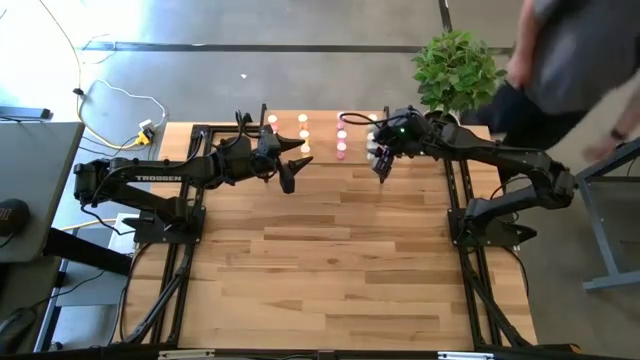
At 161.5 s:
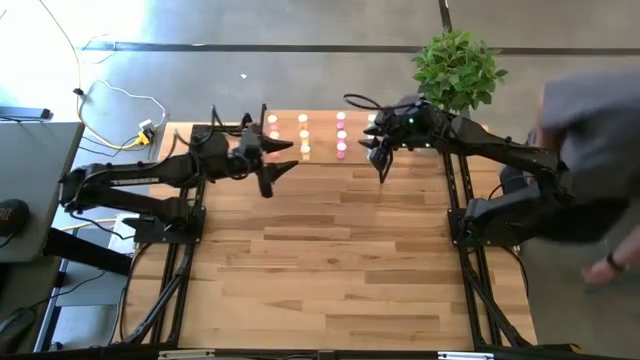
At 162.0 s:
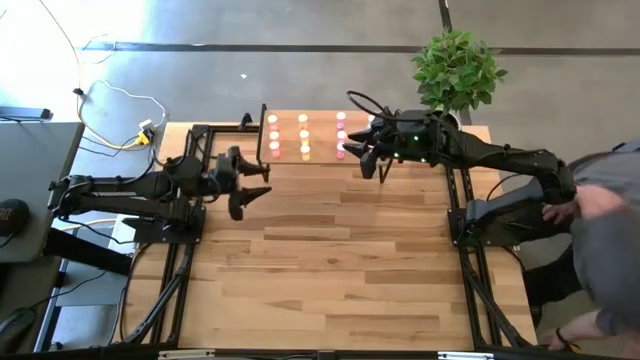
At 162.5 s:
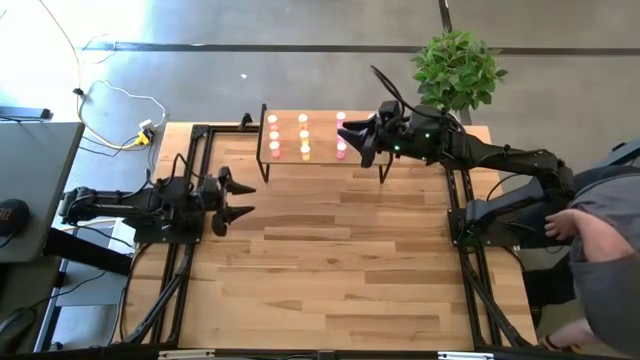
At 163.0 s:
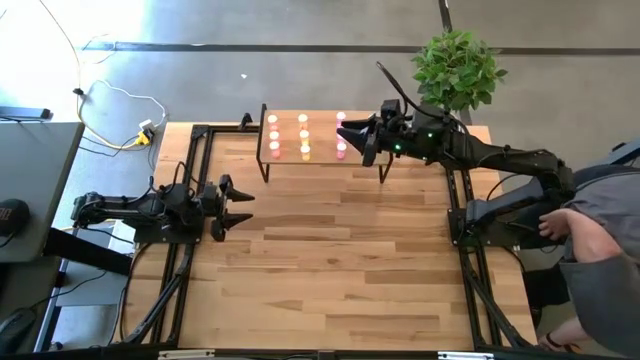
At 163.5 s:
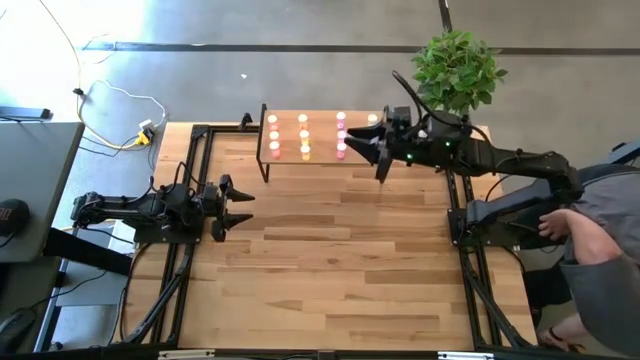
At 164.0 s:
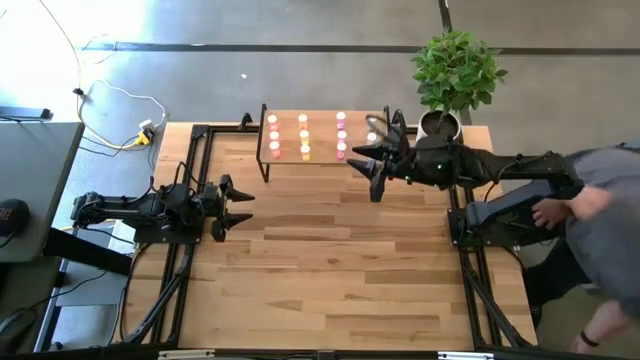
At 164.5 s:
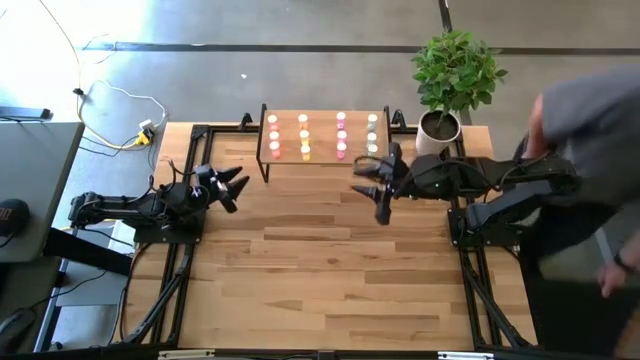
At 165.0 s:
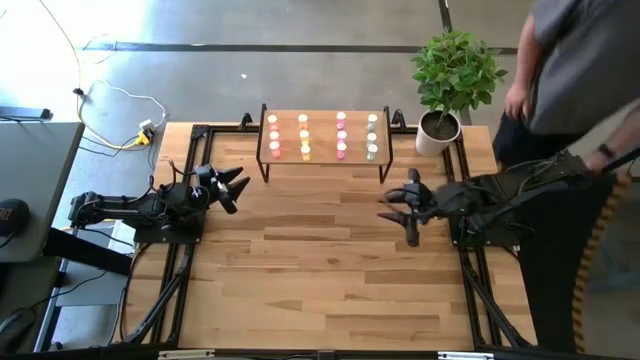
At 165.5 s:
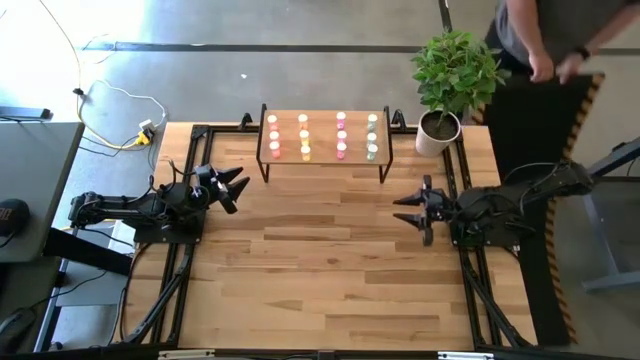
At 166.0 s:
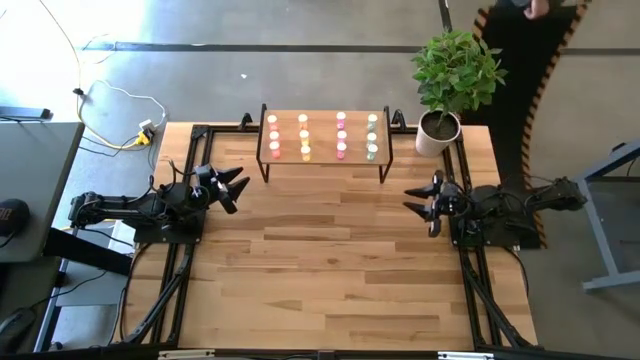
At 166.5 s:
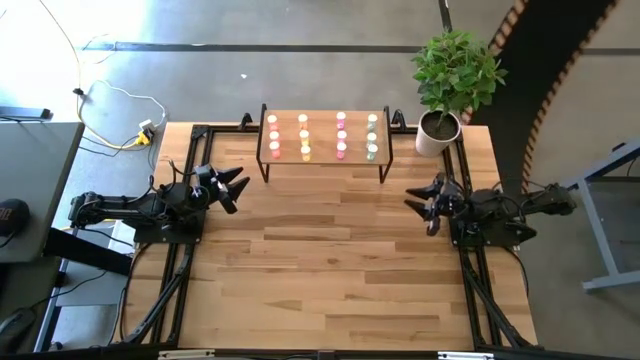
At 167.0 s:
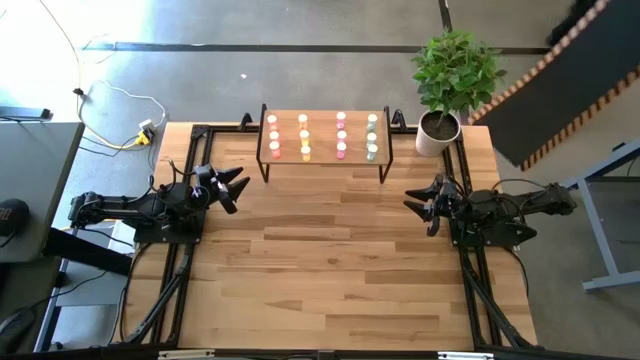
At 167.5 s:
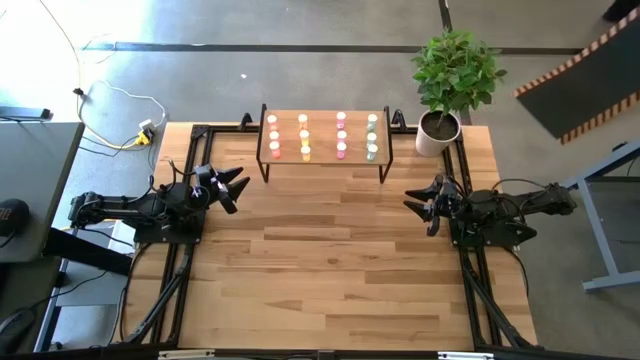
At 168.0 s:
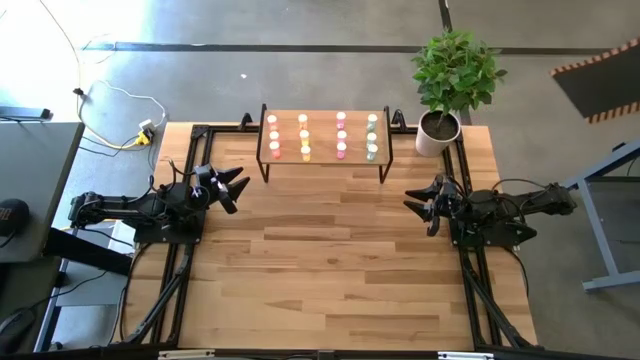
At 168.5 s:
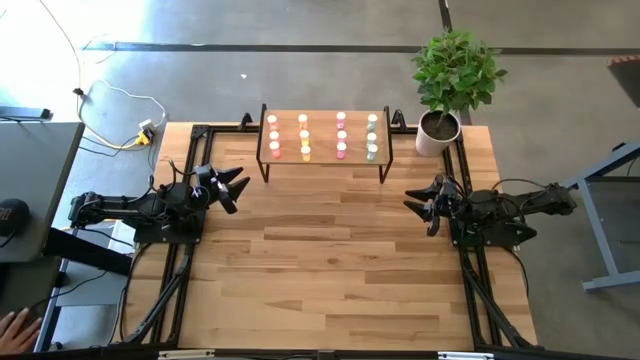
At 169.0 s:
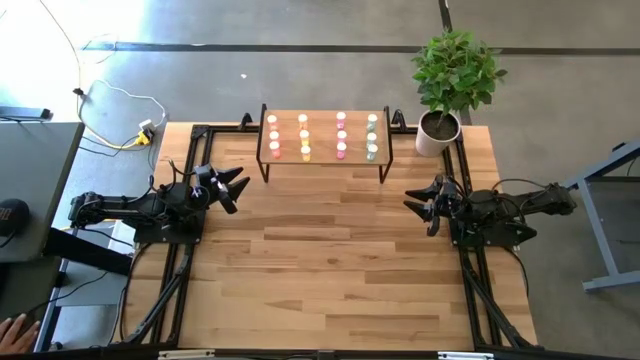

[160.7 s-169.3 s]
Task: Pick and place medicine bottles onto shelf by color
Return to Home Position

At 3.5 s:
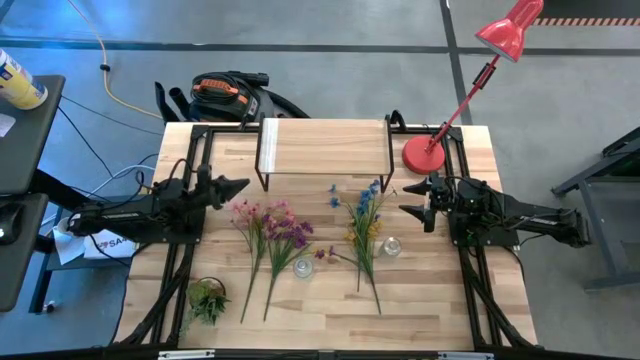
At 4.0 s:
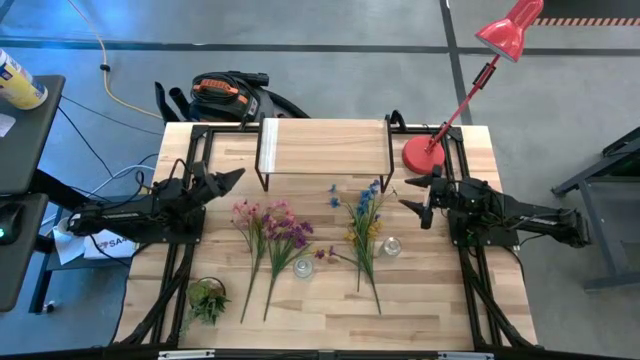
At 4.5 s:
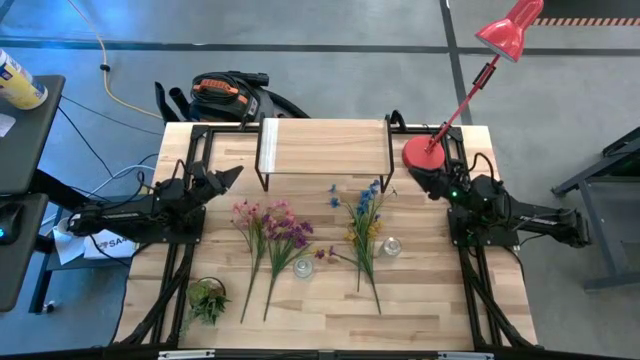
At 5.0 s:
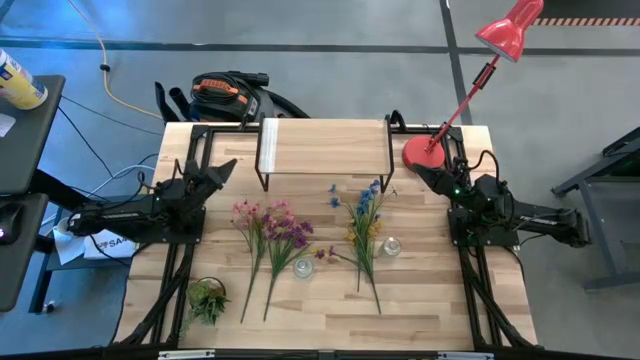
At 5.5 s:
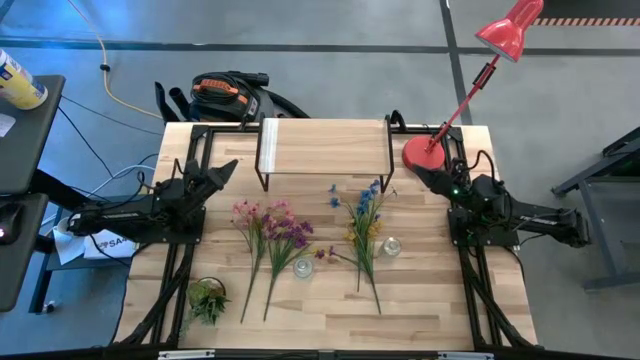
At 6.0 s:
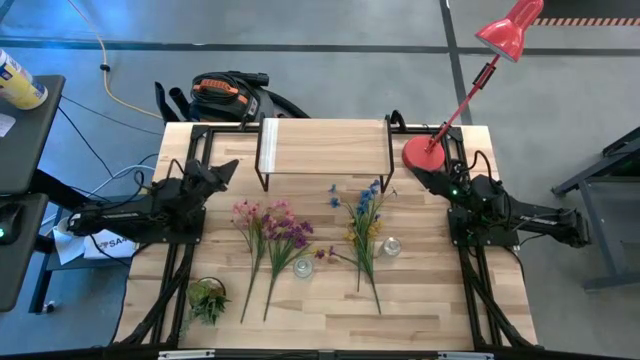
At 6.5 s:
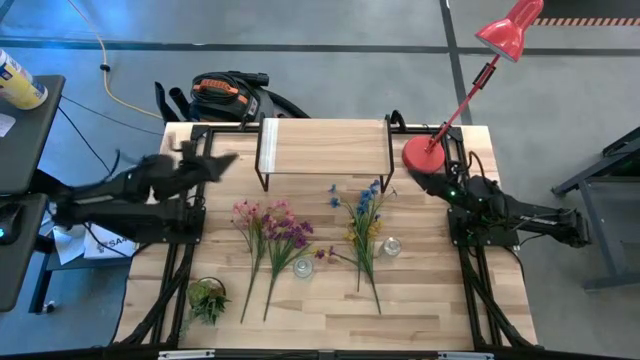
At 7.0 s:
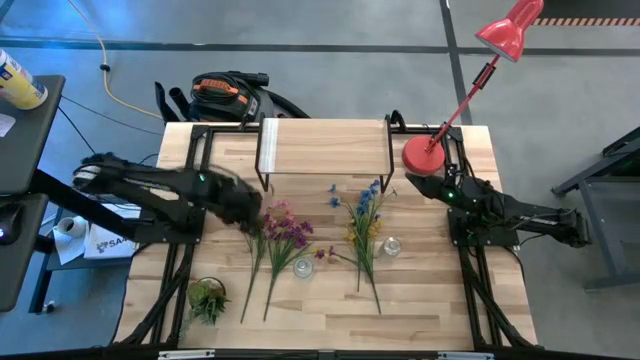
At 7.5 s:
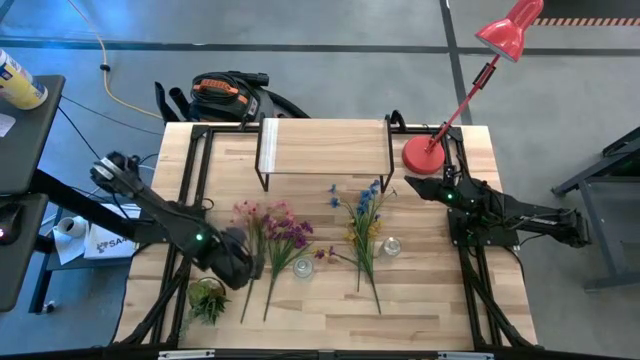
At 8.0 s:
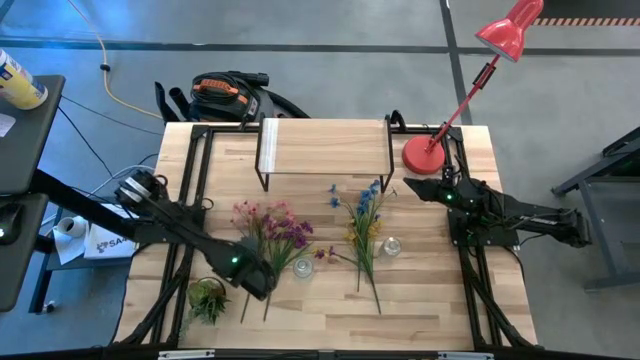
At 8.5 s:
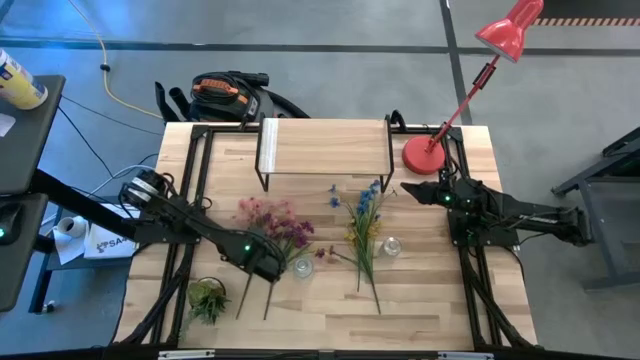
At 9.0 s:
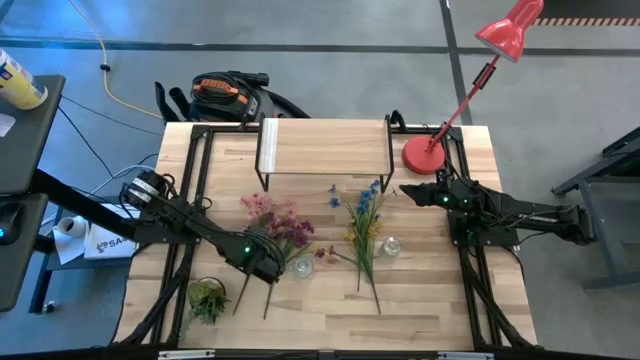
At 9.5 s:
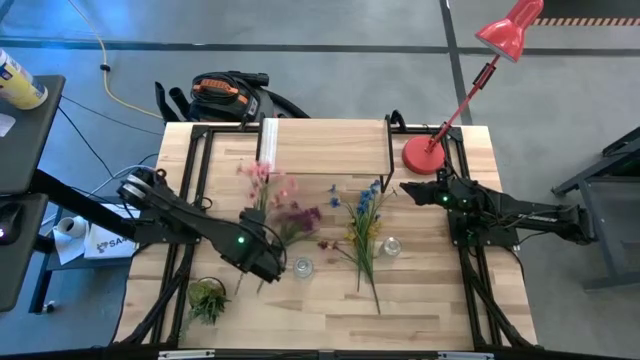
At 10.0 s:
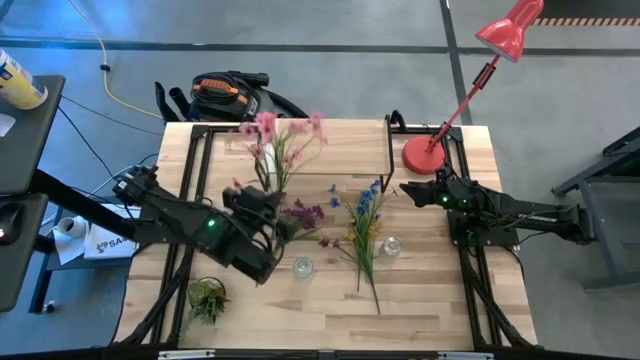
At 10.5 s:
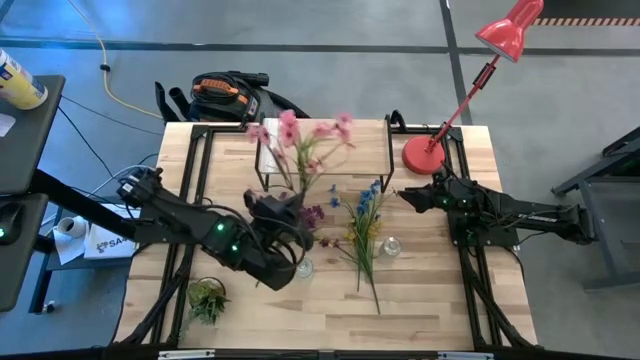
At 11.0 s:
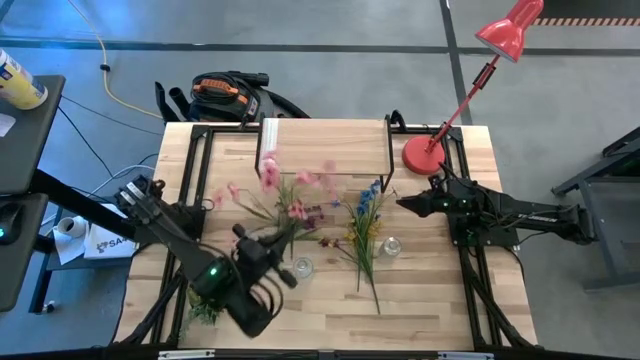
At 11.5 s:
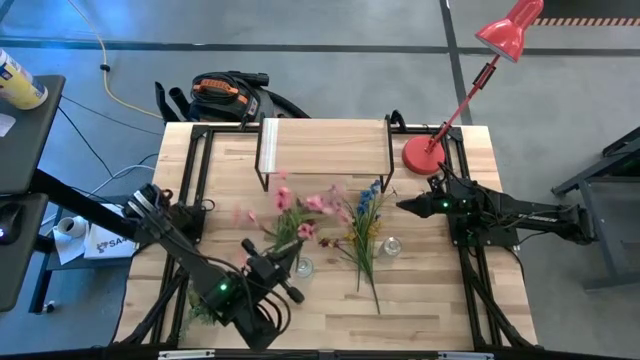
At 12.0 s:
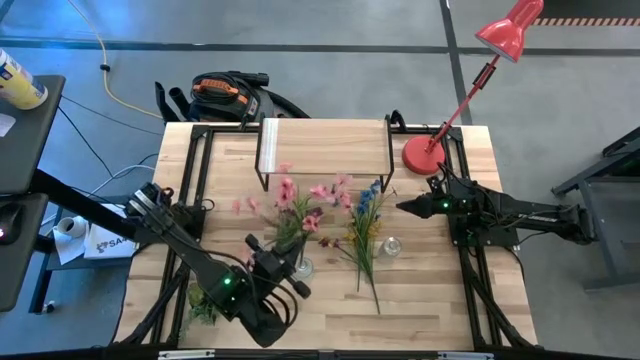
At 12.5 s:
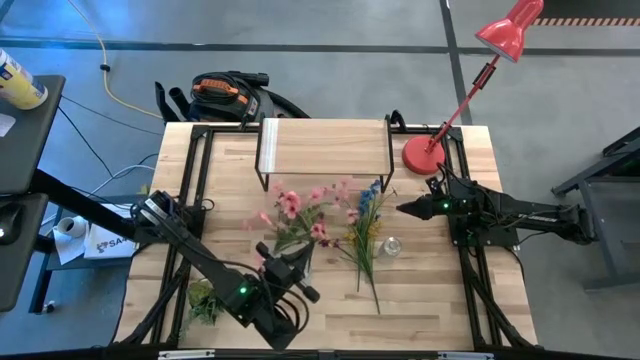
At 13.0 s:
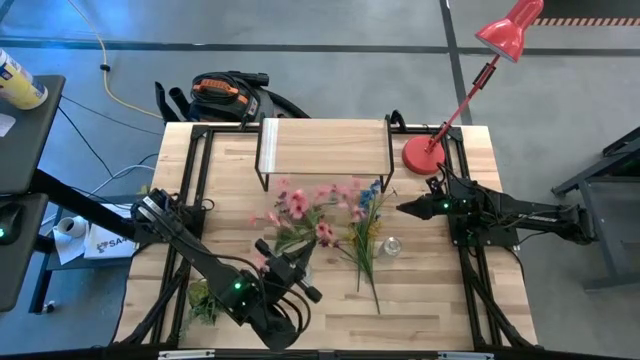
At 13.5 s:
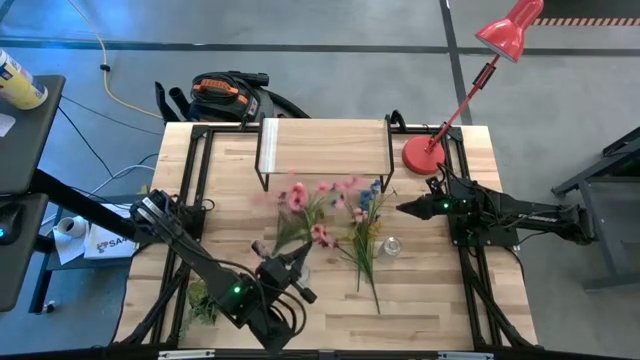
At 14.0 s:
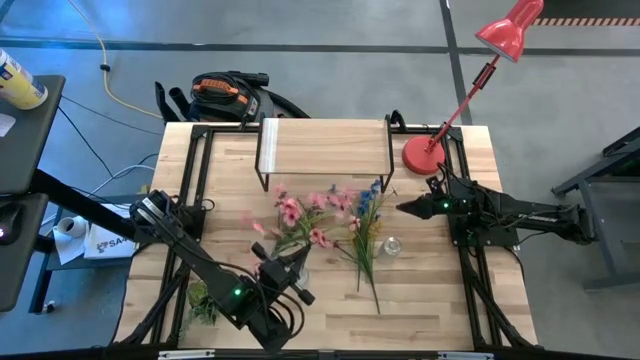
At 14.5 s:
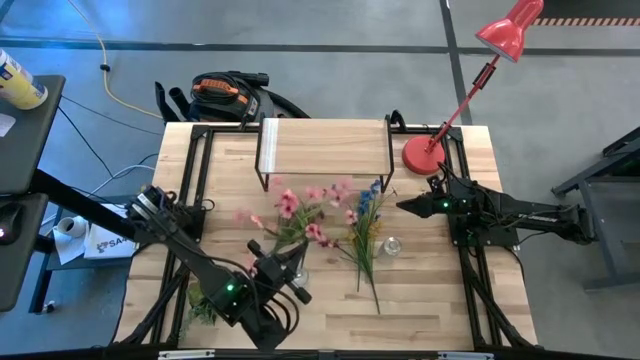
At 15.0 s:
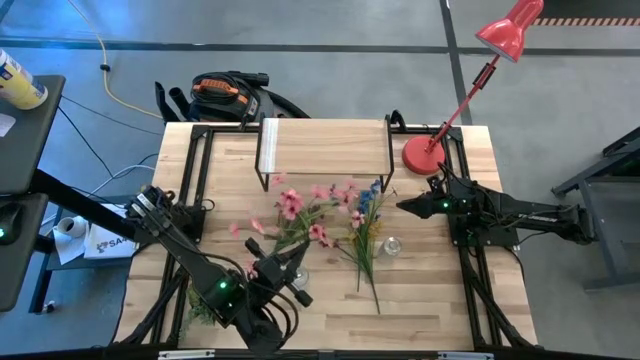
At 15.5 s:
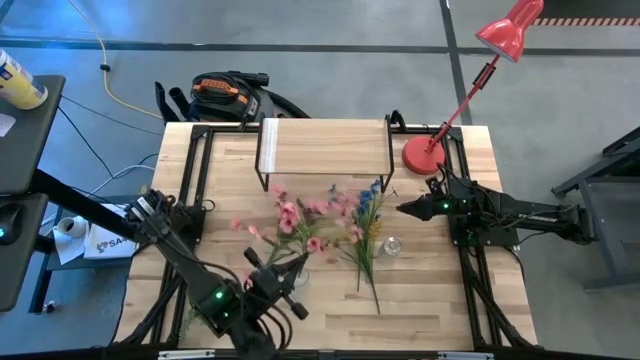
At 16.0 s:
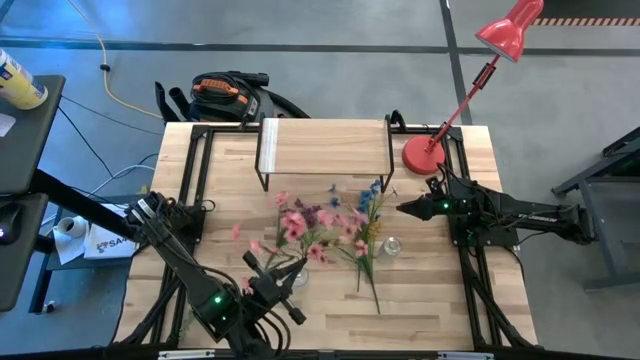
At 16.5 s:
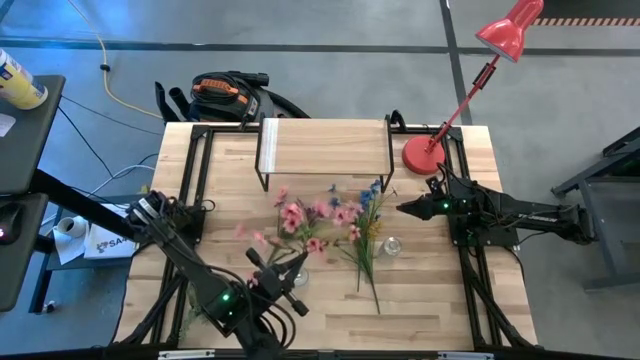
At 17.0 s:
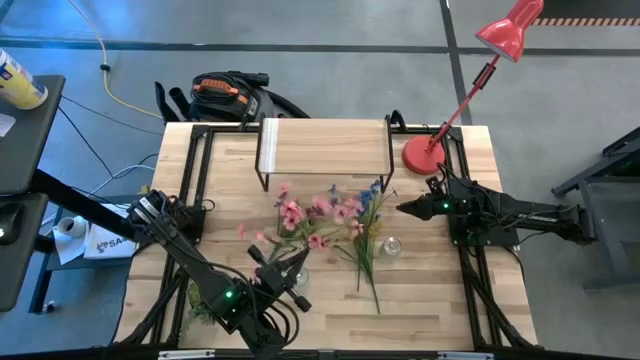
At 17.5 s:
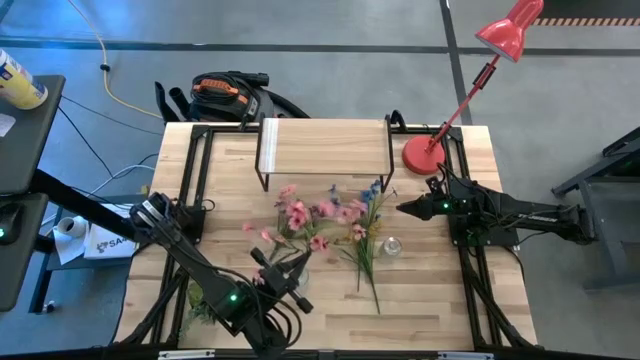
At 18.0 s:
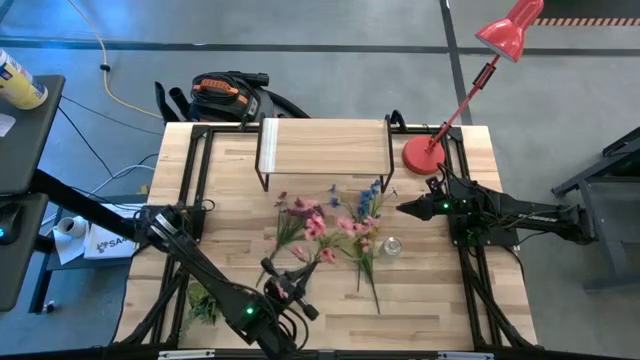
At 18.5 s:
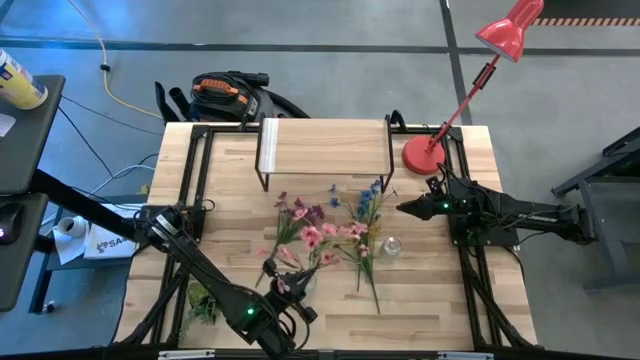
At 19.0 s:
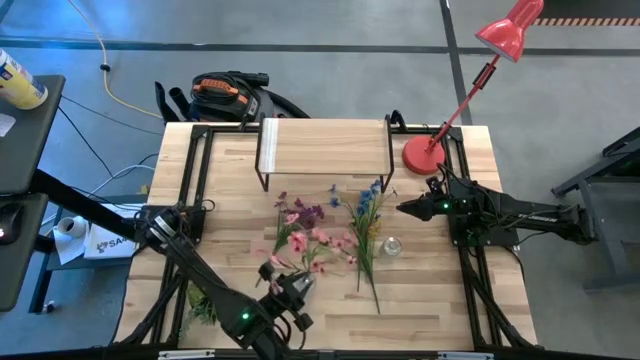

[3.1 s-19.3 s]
Task: Pick and place flowers into a vace then onto a shelf
Put the pink flowers into the left transparent vase
